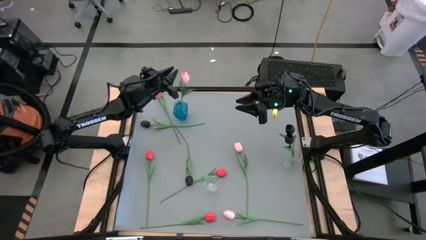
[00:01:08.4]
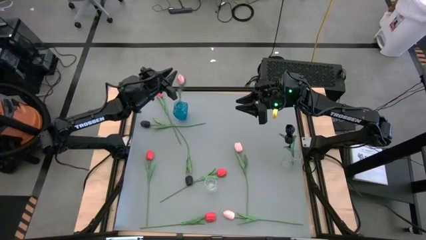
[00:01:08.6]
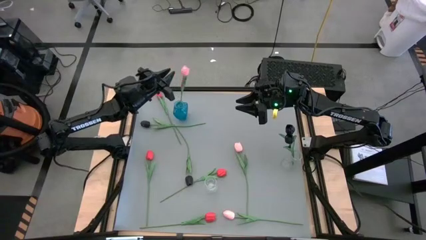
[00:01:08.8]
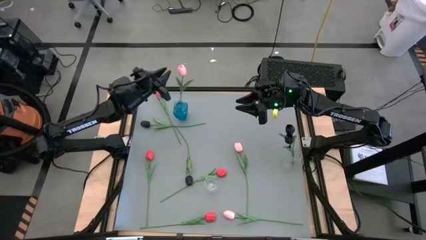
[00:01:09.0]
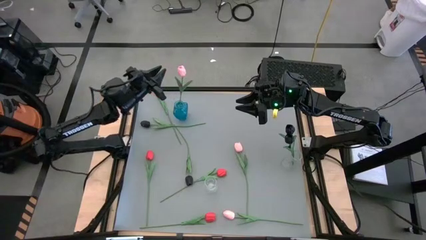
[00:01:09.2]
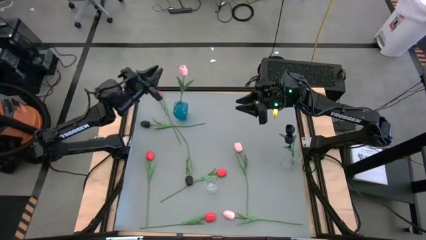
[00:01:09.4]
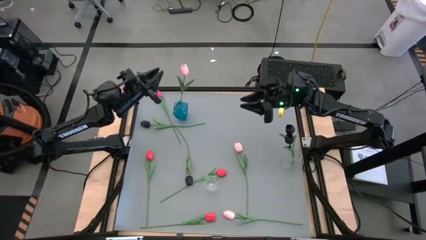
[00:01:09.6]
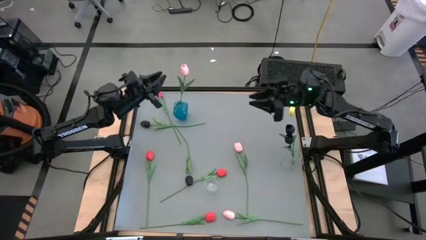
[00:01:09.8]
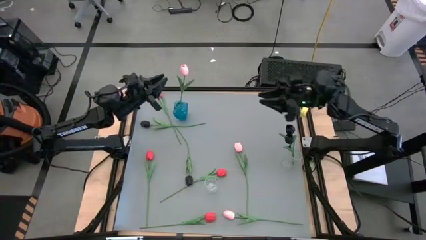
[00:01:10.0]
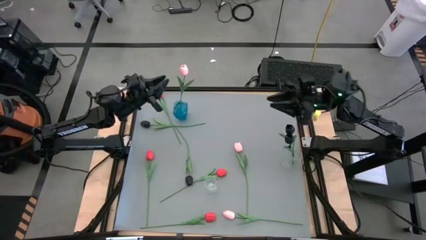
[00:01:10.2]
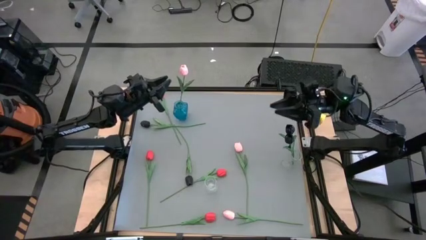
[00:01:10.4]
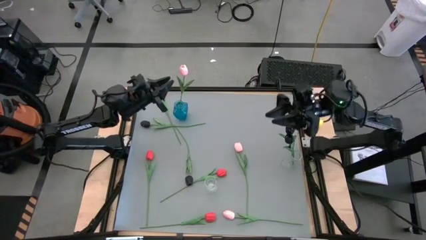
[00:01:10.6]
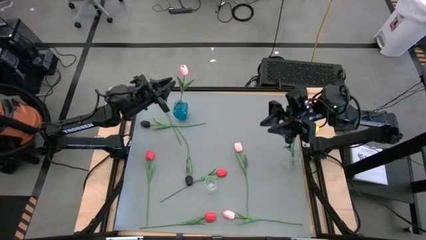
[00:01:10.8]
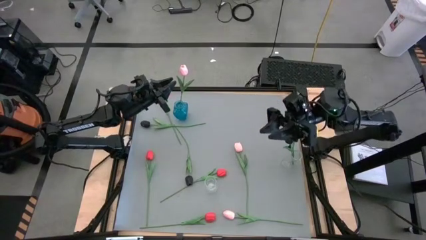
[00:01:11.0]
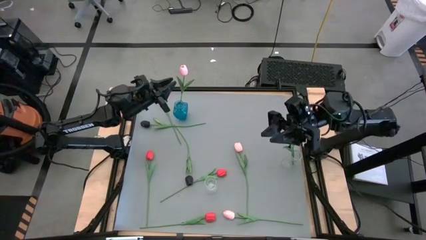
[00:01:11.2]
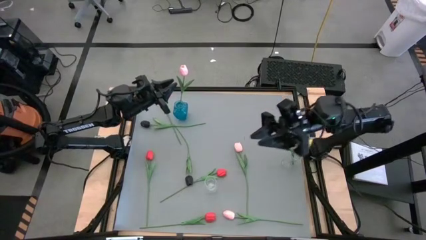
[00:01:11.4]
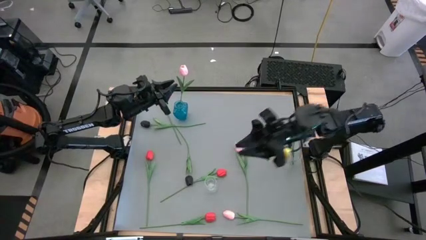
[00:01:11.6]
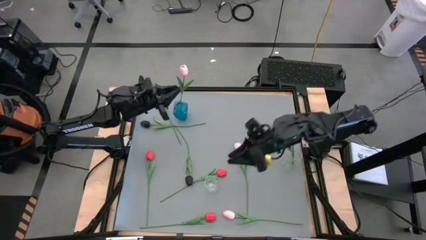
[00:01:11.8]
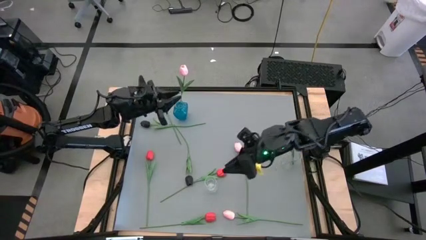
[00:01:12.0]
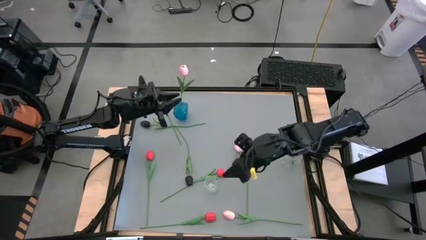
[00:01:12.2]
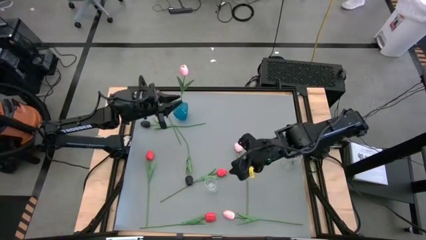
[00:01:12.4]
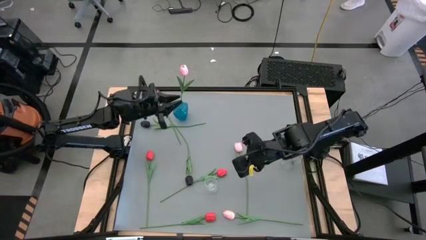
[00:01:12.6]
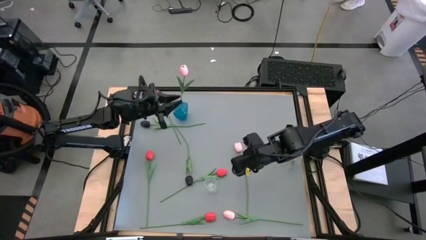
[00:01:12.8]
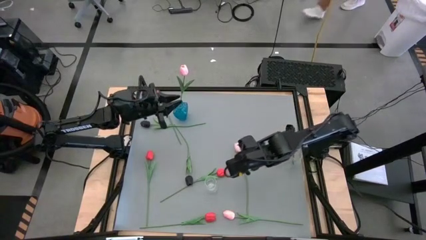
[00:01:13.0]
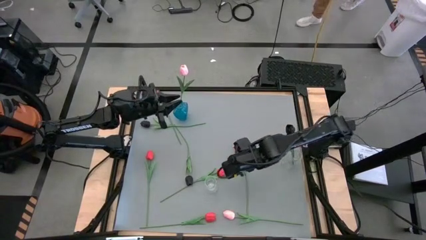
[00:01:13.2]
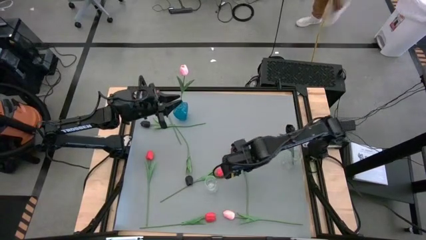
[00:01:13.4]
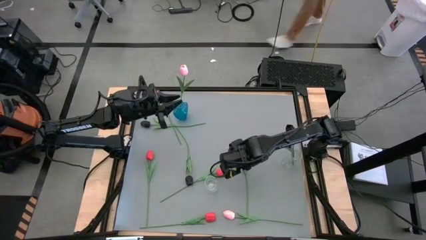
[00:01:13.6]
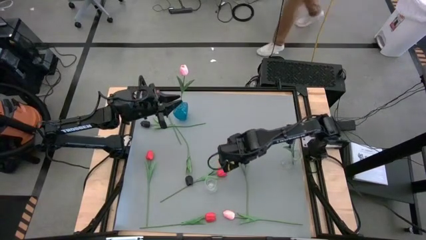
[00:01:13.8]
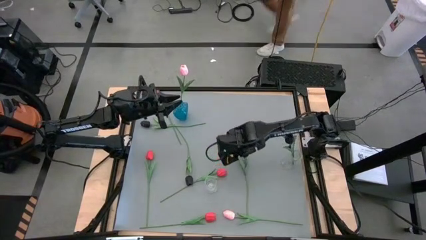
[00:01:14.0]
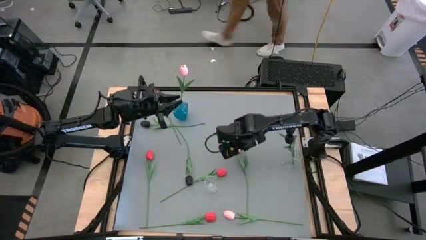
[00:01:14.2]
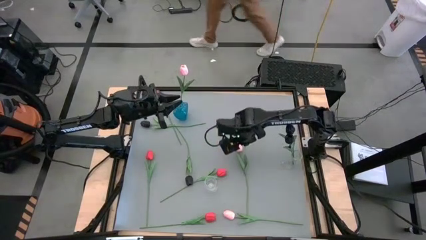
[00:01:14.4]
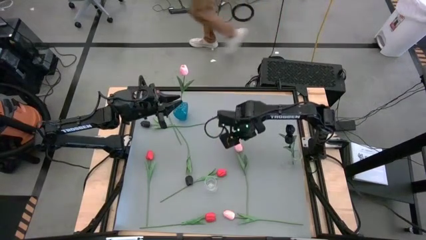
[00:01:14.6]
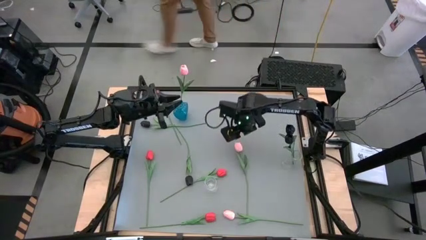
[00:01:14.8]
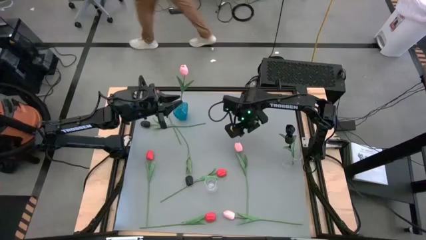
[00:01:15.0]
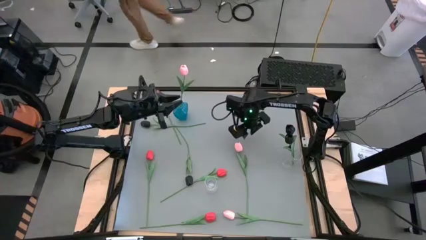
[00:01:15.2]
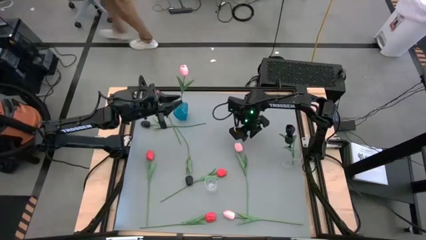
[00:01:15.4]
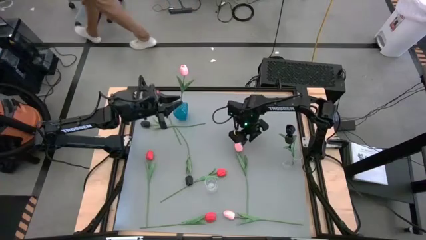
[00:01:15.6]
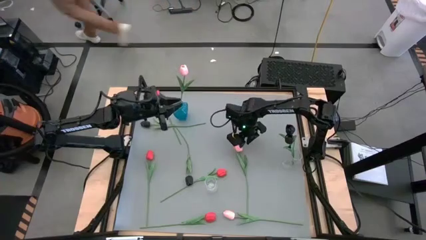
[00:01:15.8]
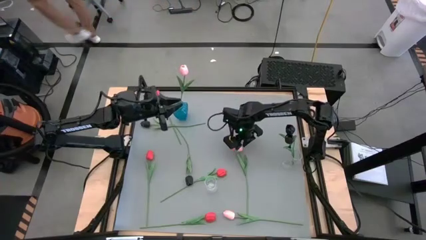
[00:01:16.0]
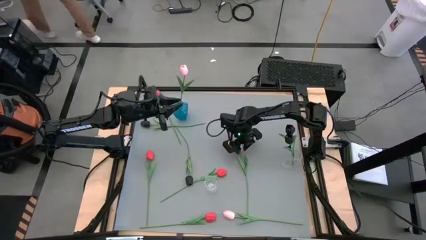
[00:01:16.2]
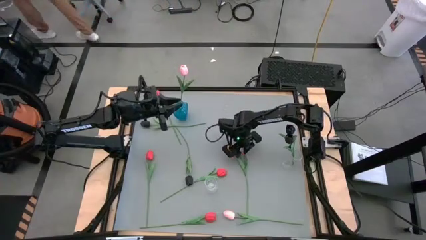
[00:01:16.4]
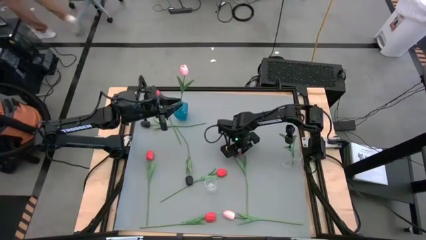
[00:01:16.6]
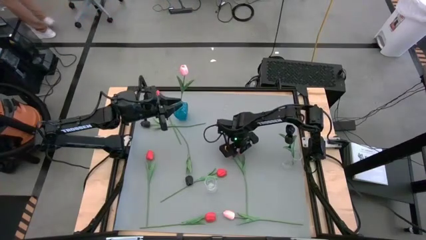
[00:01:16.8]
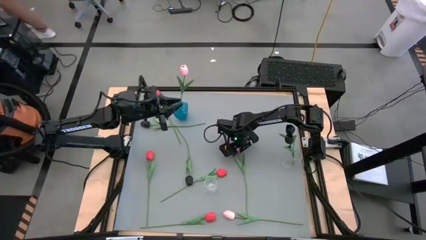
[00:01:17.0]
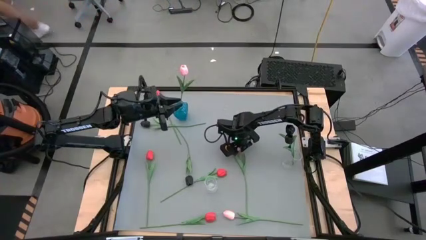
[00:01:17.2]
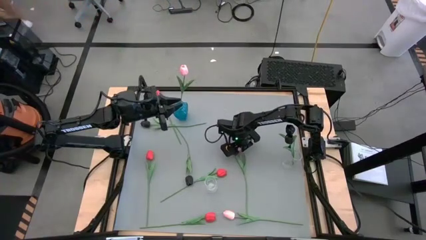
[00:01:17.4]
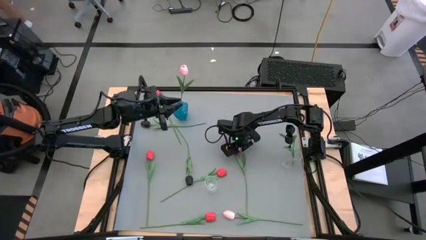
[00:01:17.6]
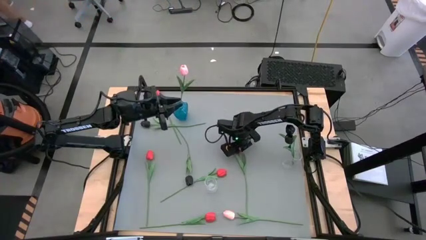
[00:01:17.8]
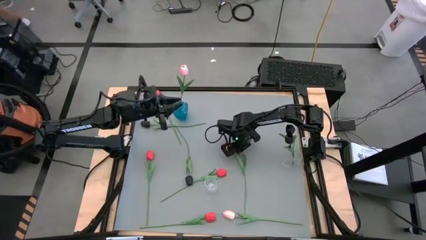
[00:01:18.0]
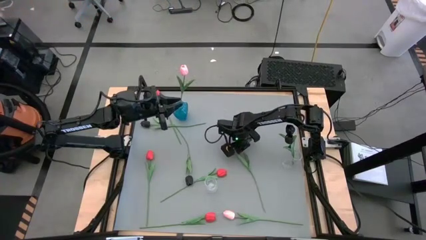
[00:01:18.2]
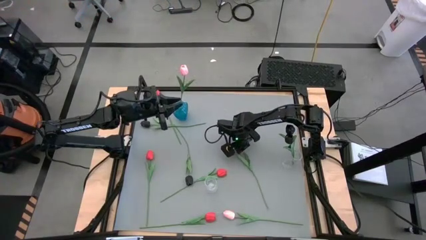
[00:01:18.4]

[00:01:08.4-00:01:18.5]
Task: Sort flowers into vase by color
Put pink flower into the blue vase
